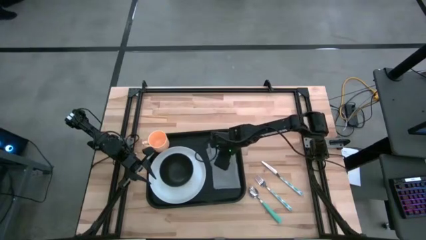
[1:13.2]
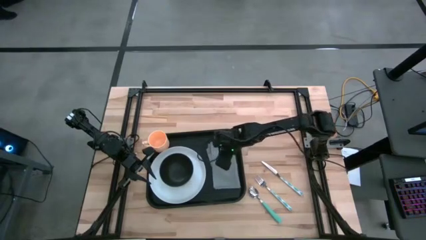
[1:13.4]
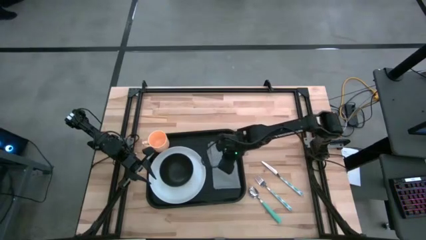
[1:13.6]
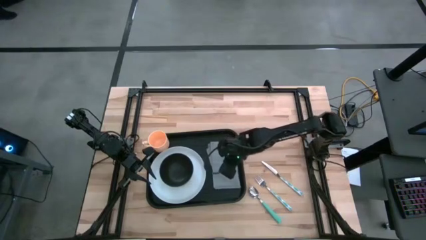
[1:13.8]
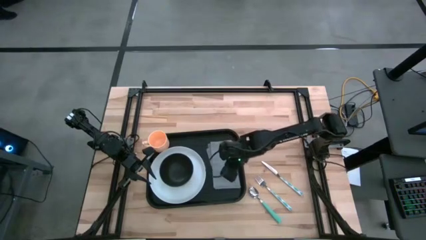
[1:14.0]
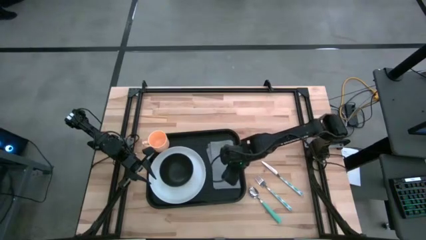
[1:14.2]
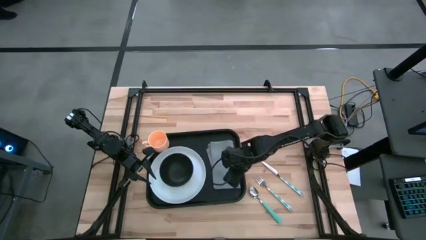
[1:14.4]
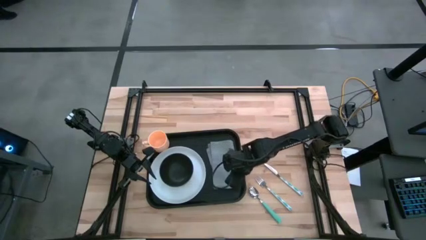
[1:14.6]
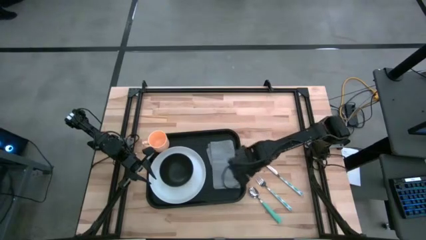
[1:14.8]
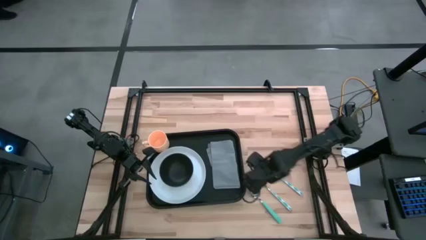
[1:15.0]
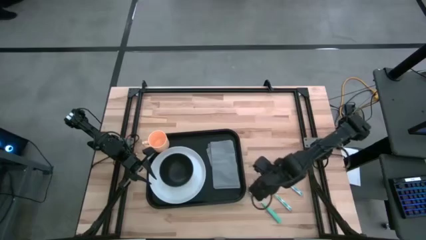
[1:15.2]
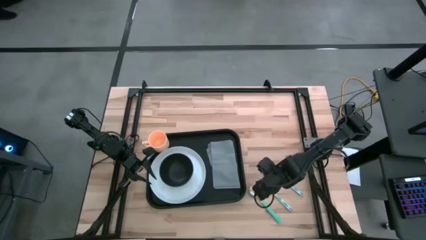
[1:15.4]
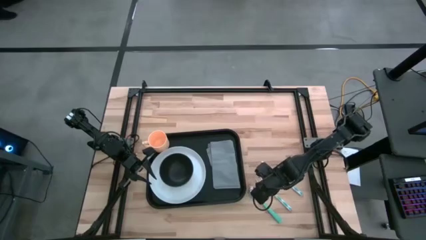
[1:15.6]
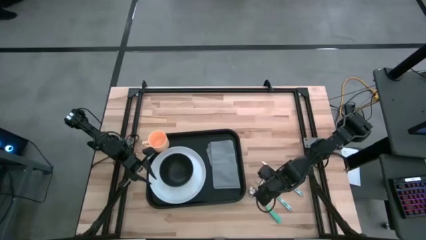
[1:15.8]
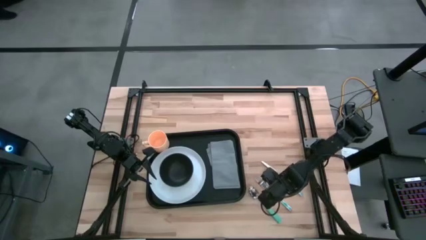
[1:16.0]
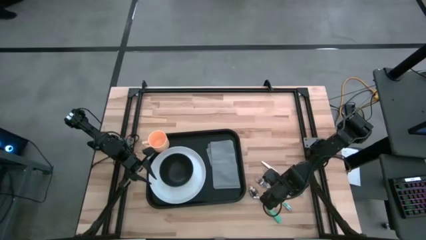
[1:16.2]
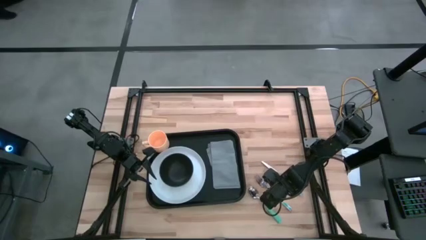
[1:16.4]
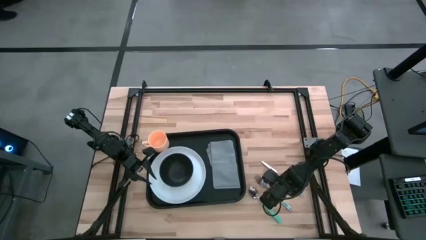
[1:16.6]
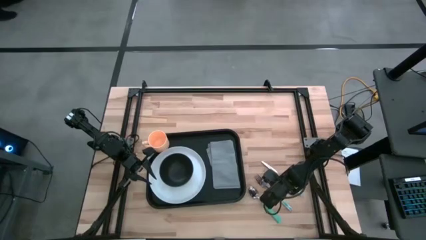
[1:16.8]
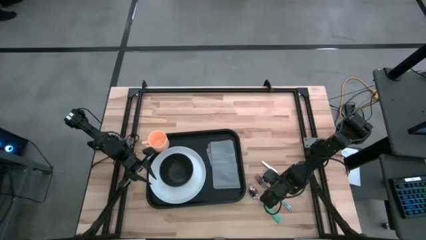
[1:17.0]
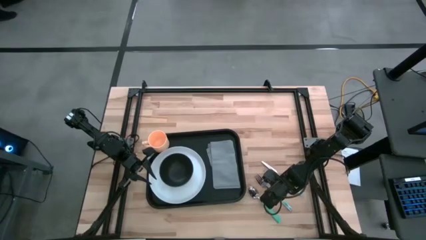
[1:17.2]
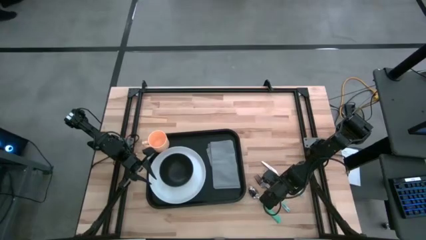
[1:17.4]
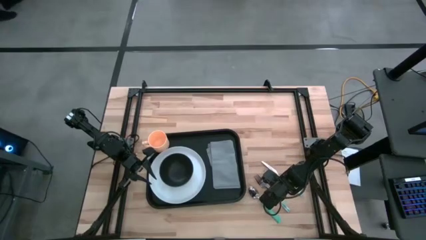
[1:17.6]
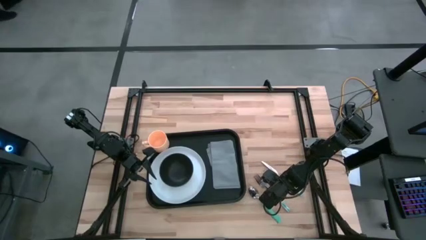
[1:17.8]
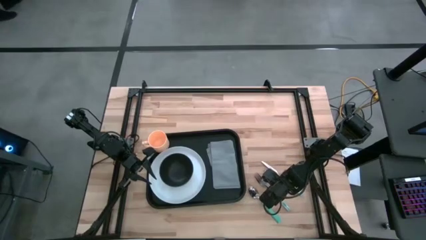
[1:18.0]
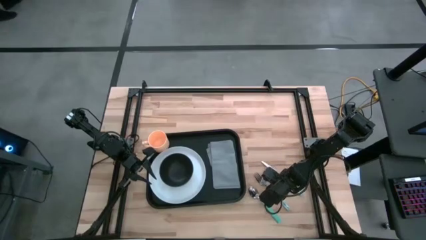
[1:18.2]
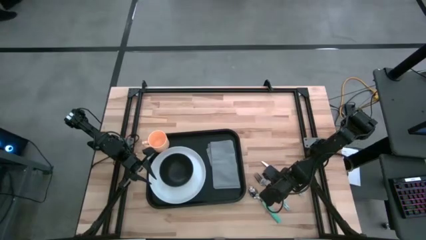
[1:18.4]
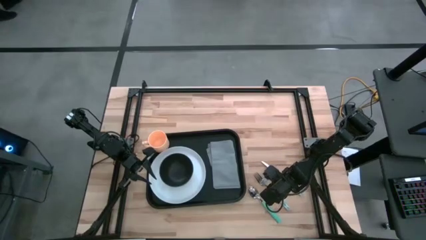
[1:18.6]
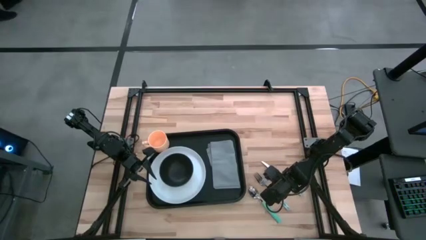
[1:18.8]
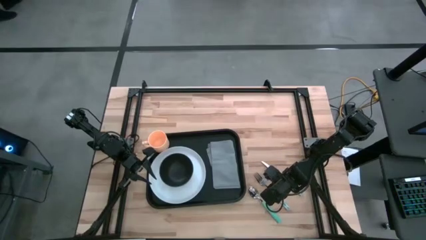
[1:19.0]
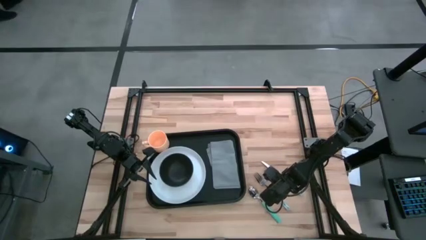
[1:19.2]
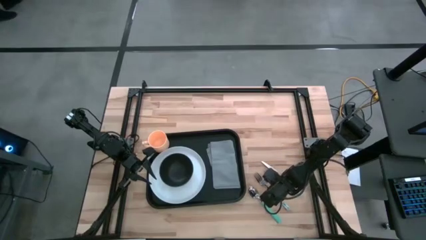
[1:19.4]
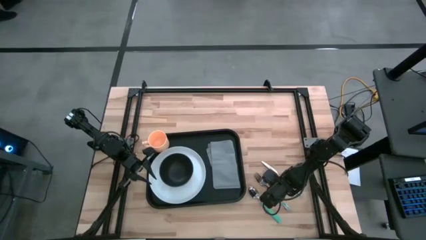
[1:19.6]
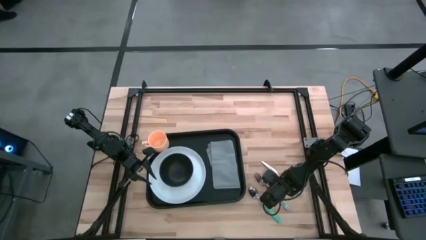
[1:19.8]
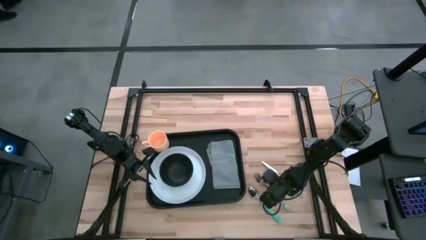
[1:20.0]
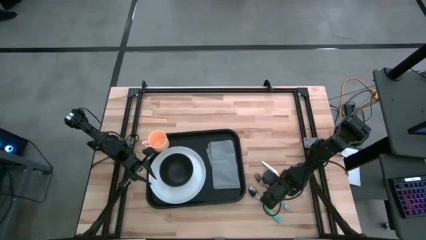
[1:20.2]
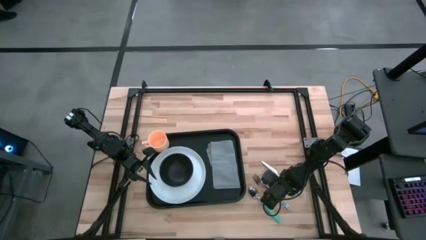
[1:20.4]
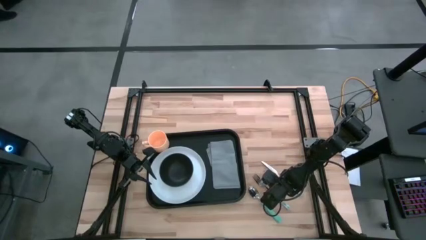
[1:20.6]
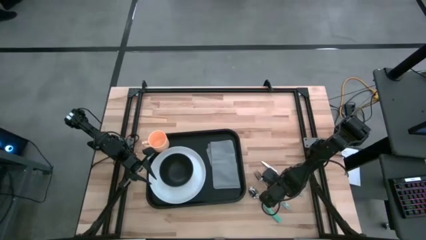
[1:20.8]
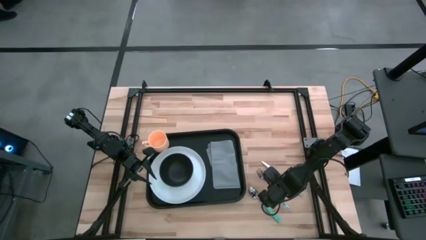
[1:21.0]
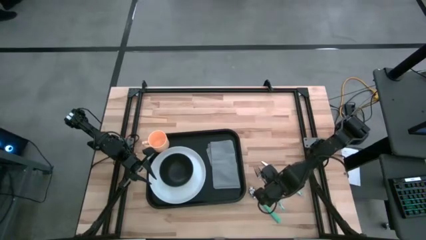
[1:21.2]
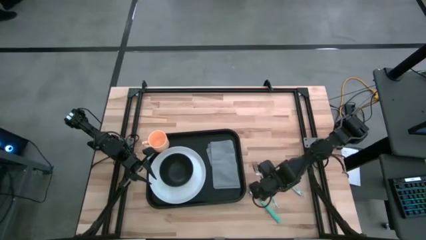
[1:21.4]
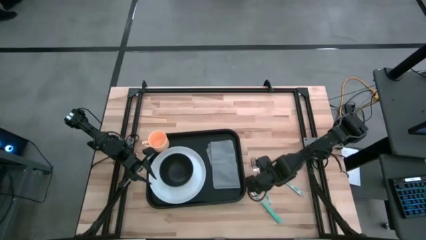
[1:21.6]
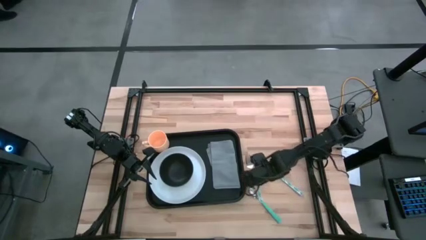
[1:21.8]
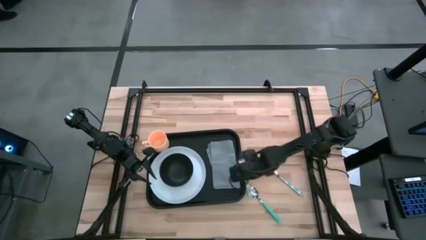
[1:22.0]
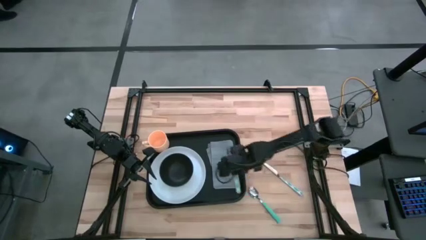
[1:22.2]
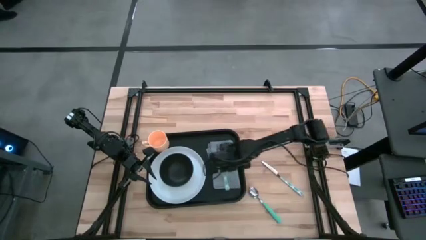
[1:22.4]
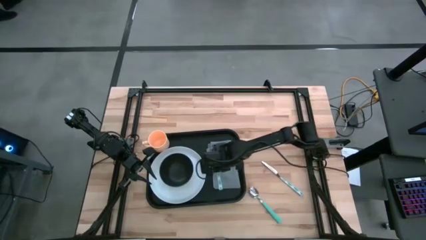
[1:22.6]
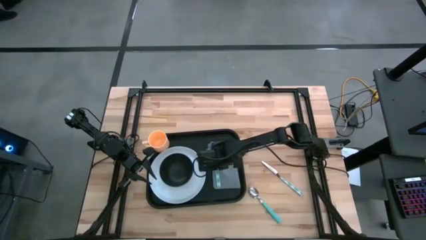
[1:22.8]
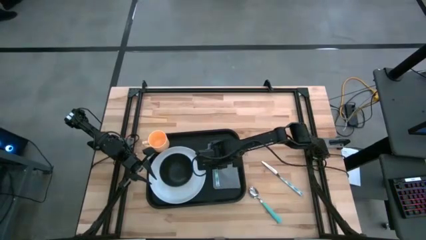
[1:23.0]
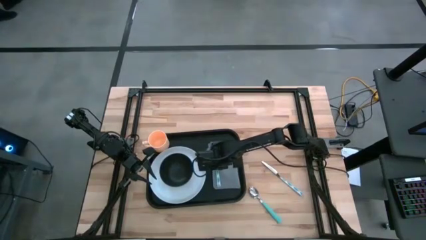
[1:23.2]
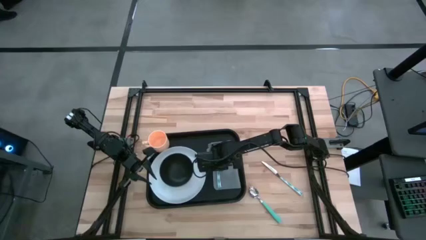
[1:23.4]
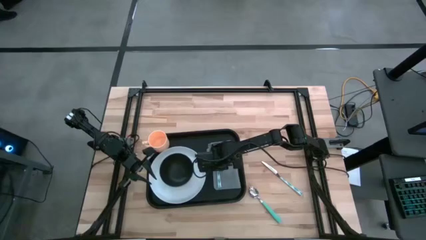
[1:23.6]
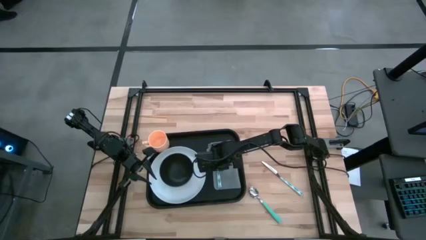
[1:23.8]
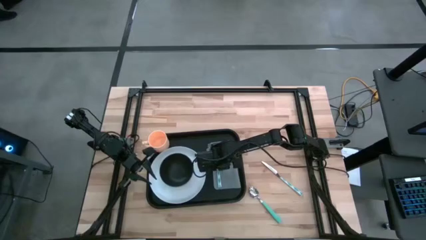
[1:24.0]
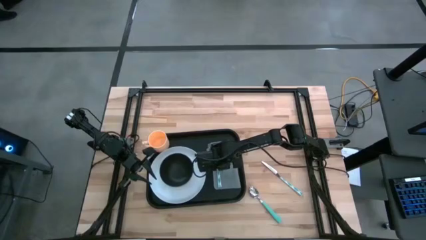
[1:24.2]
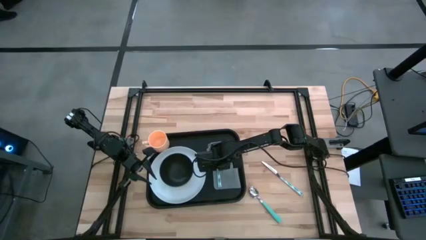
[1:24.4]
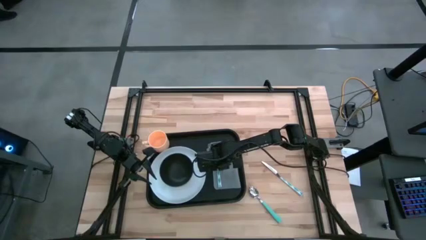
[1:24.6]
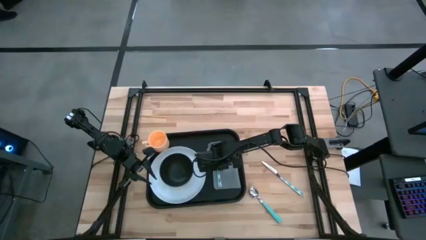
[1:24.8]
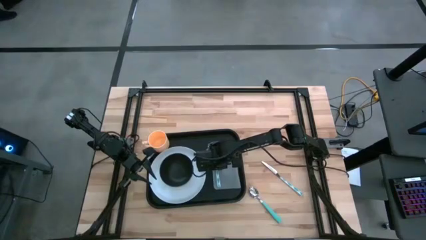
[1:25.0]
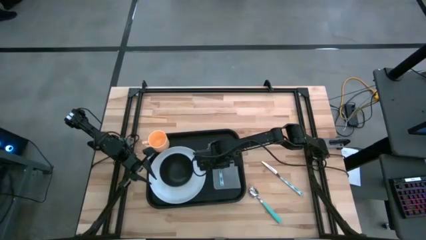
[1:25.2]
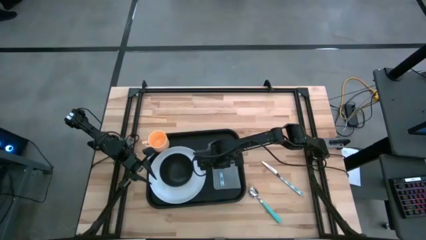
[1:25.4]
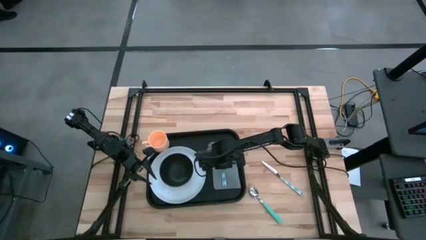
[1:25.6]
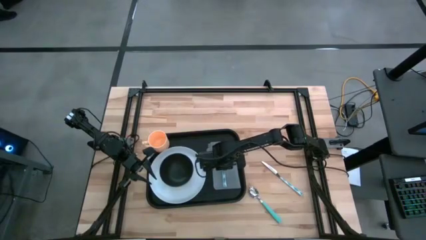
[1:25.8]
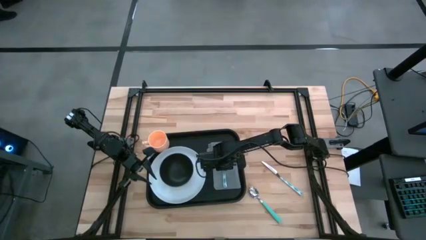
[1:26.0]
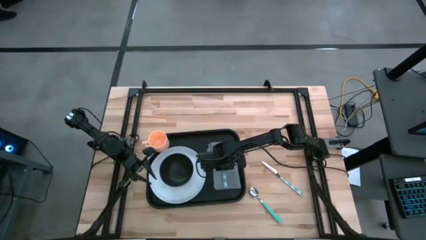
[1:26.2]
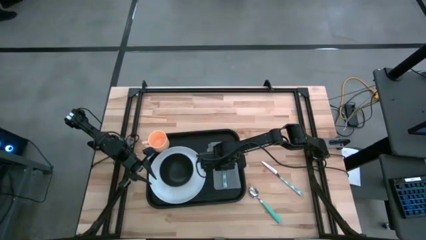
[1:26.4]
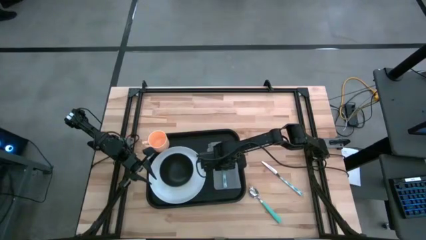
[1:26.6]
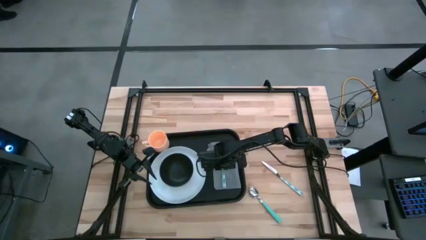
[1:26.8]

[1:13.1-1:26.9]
Task: Set up tray
Put the white patterned fork on the gray napkin to the right of the white plate
